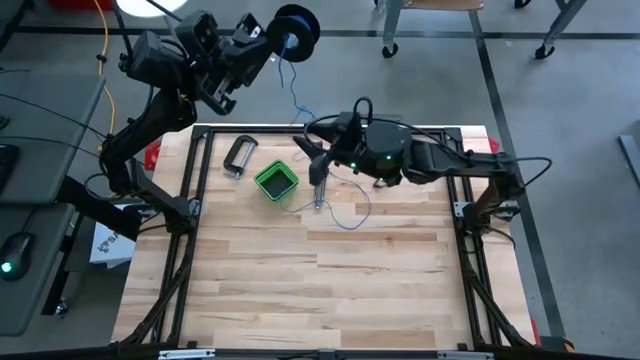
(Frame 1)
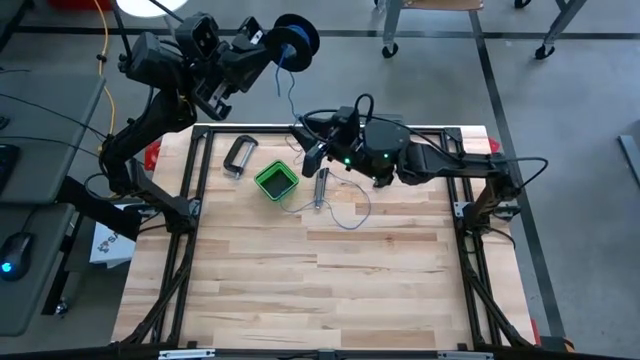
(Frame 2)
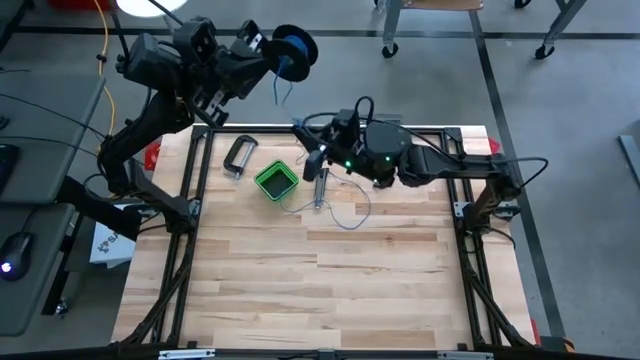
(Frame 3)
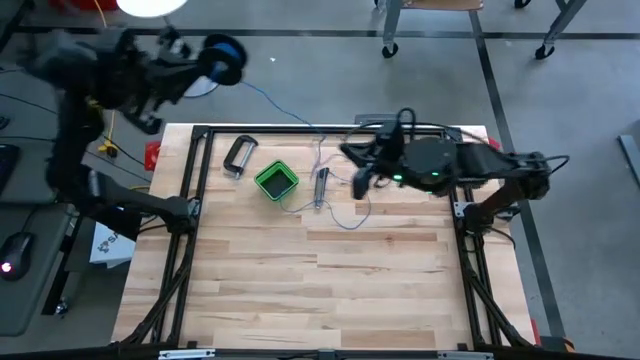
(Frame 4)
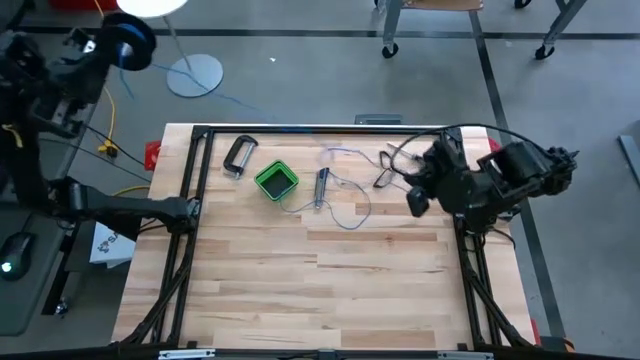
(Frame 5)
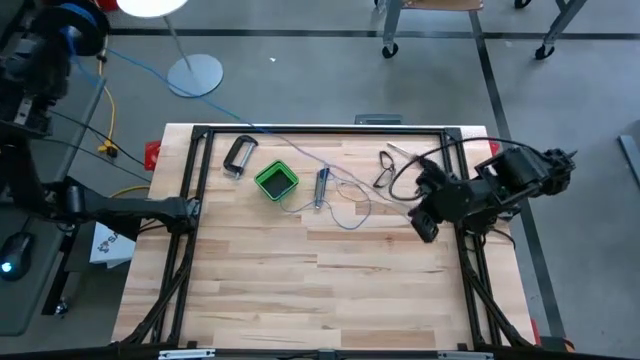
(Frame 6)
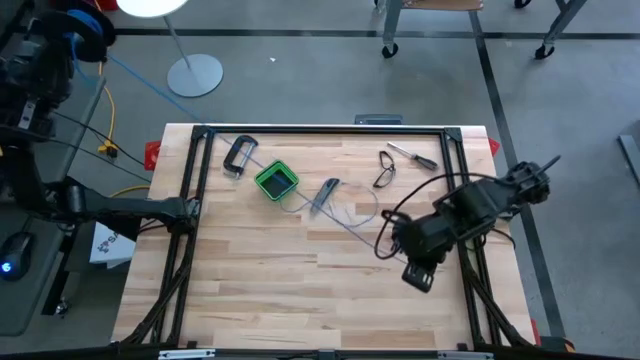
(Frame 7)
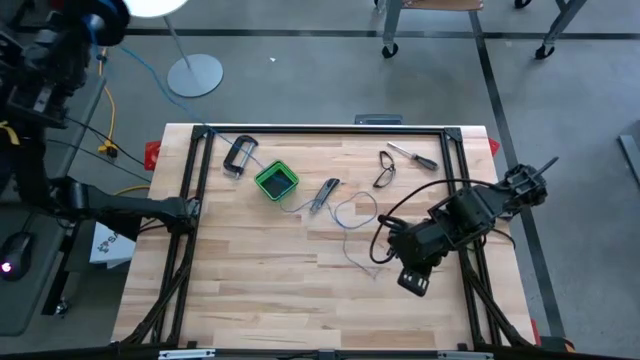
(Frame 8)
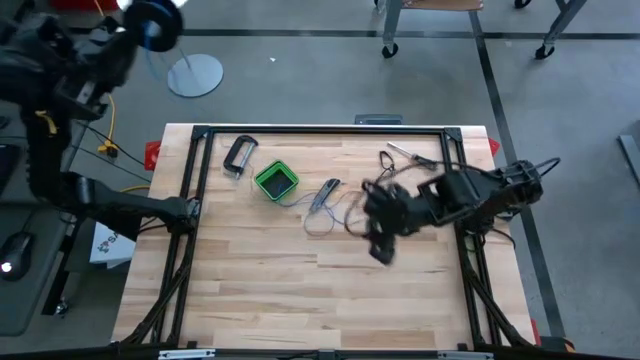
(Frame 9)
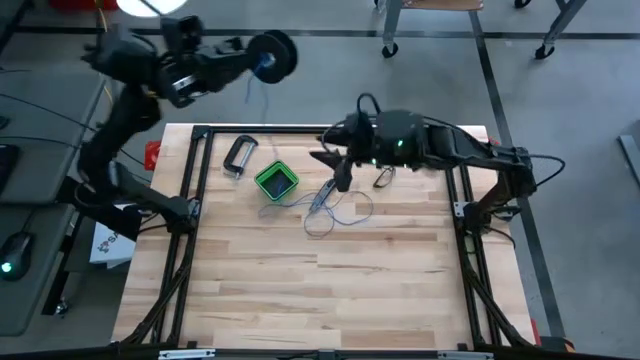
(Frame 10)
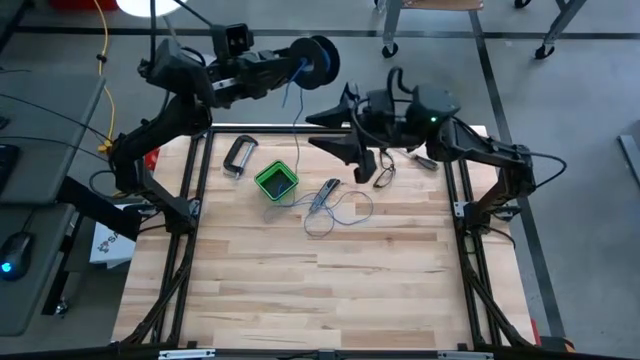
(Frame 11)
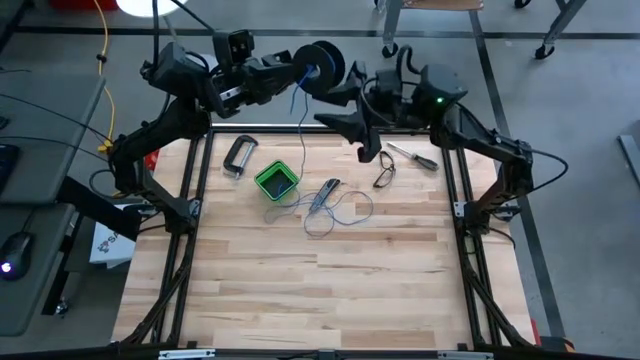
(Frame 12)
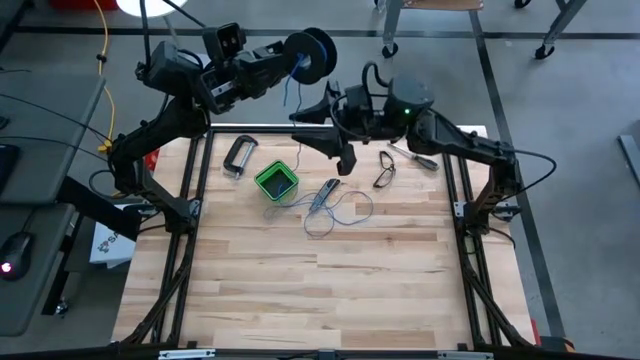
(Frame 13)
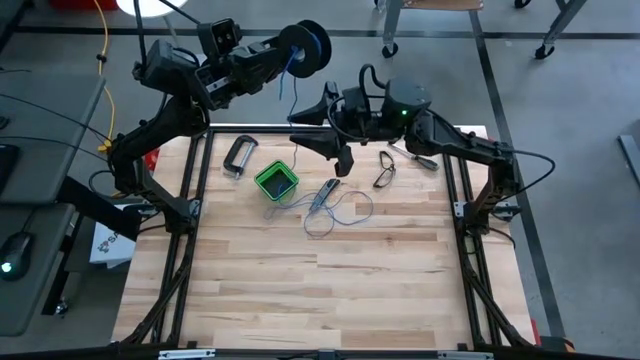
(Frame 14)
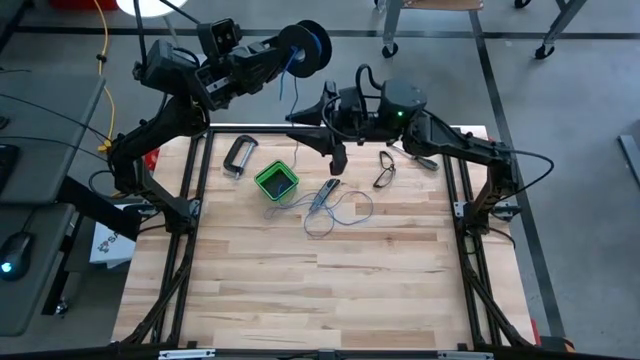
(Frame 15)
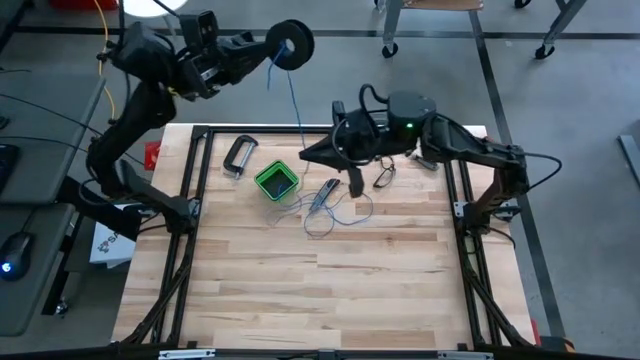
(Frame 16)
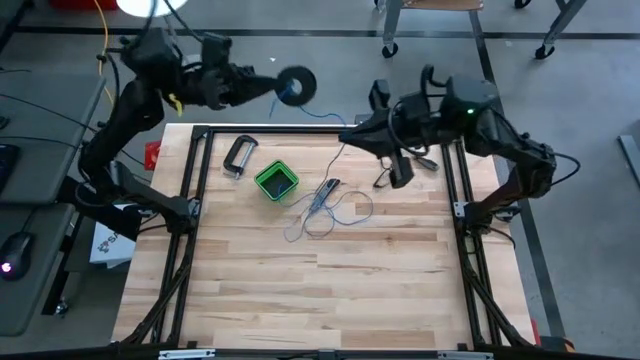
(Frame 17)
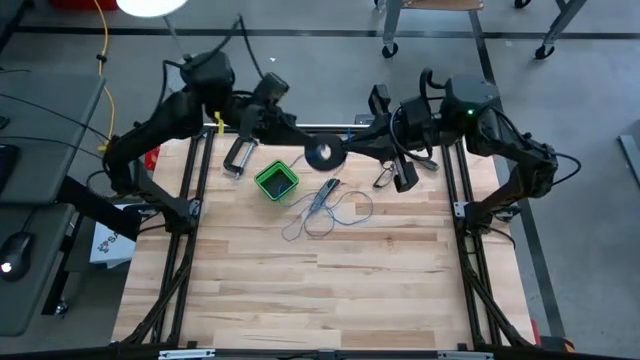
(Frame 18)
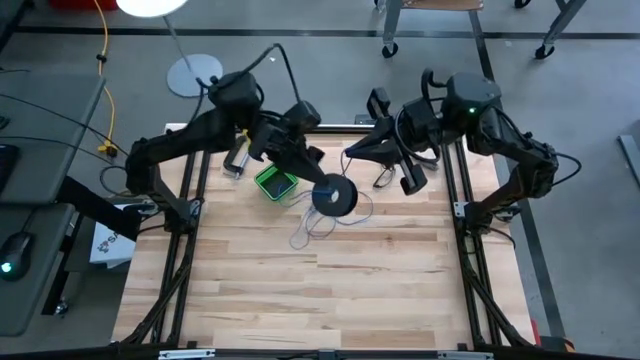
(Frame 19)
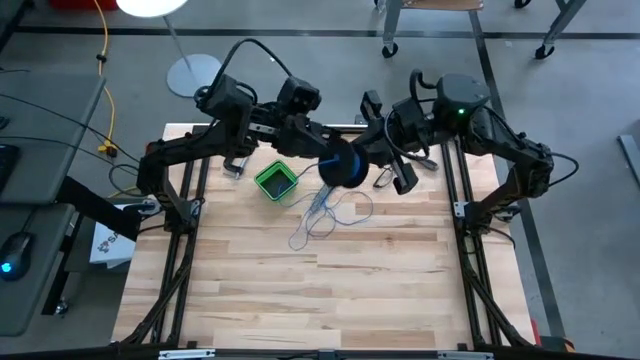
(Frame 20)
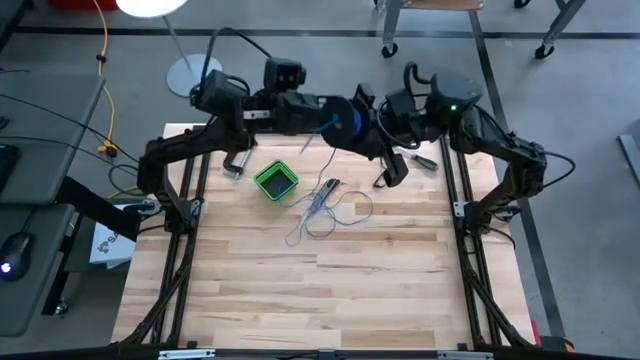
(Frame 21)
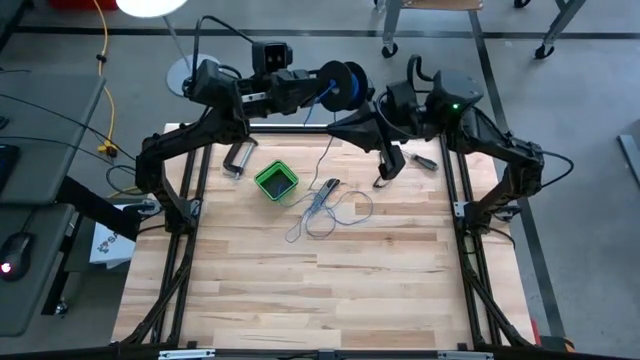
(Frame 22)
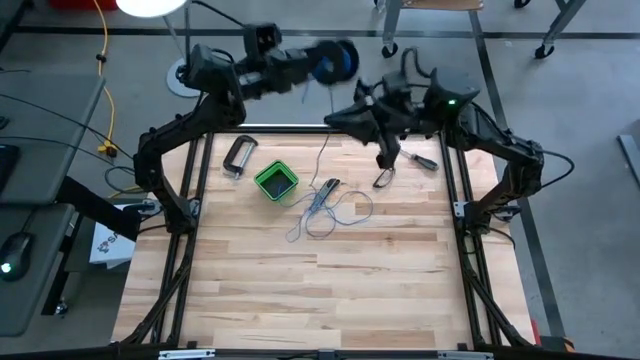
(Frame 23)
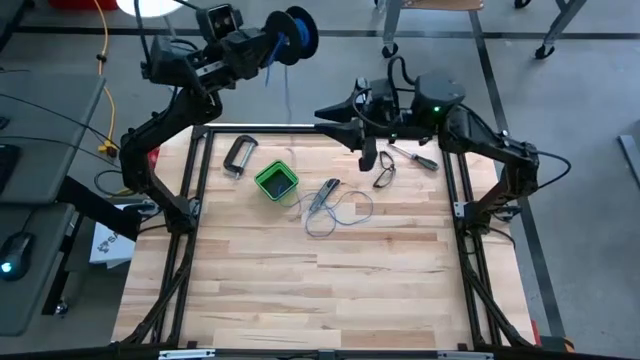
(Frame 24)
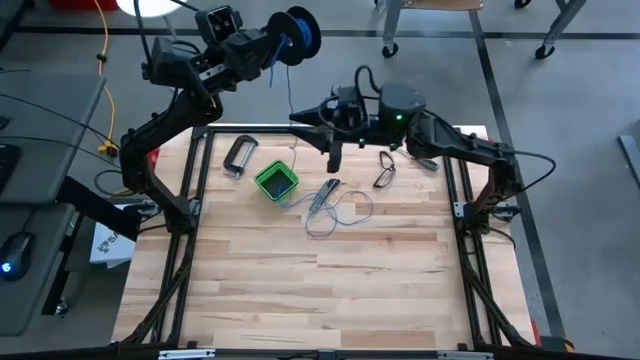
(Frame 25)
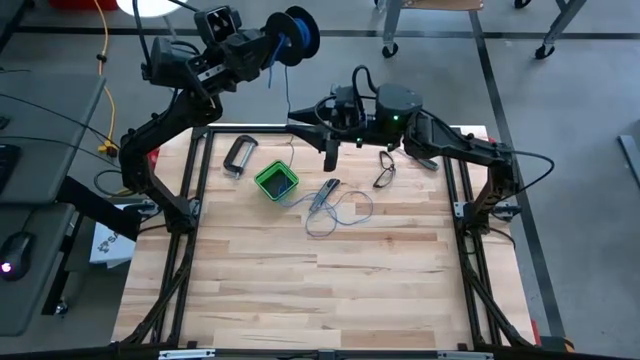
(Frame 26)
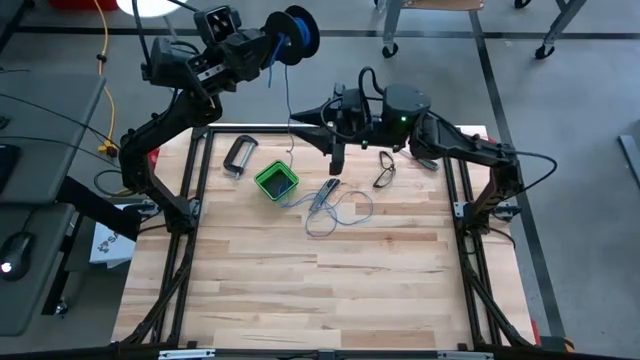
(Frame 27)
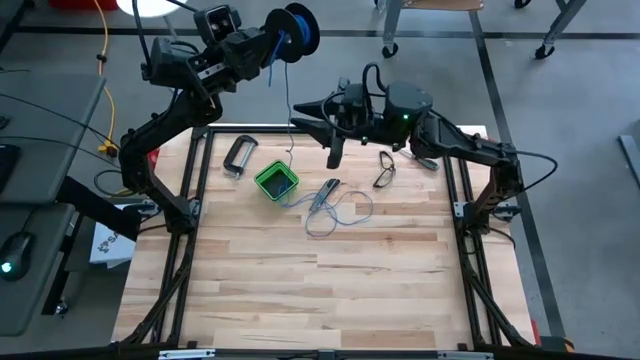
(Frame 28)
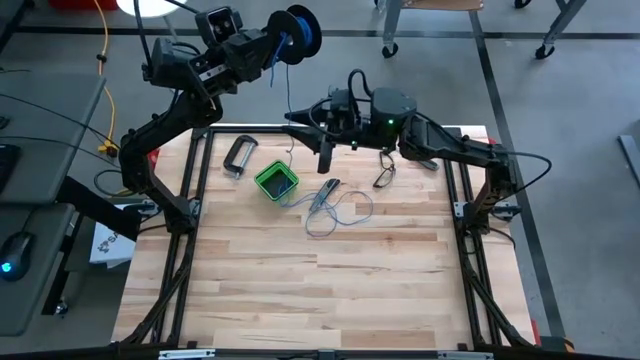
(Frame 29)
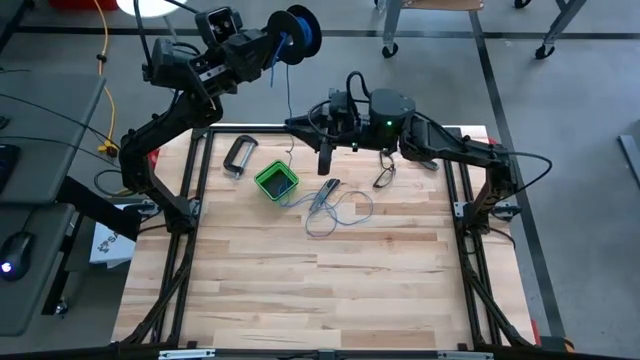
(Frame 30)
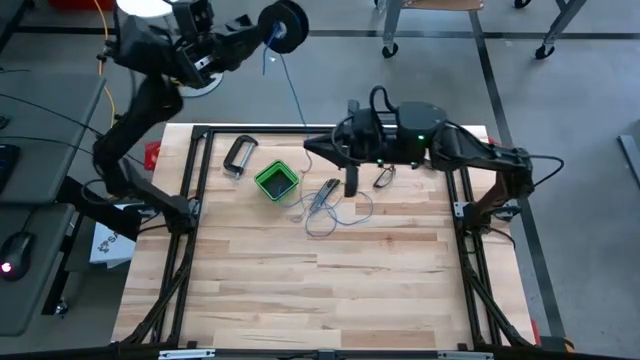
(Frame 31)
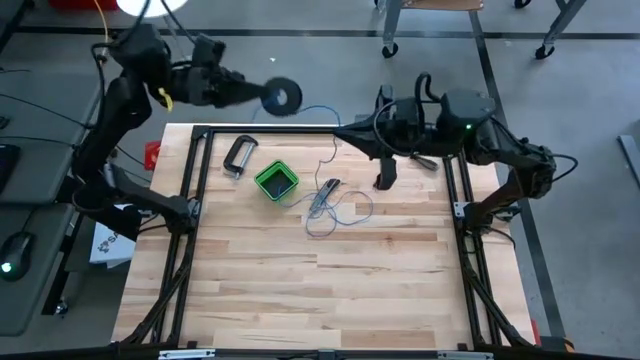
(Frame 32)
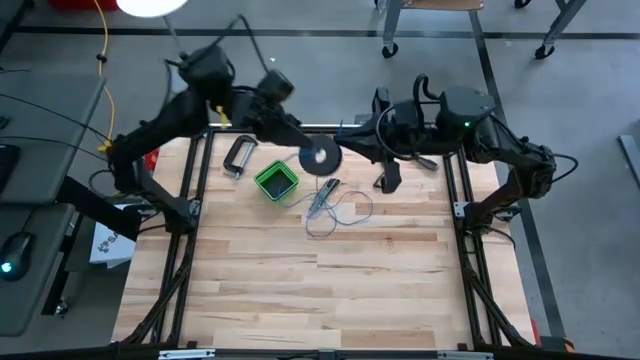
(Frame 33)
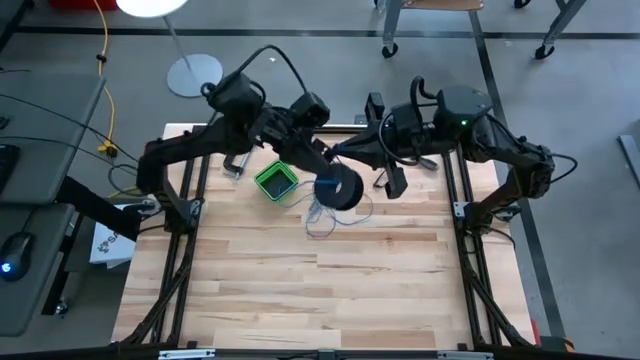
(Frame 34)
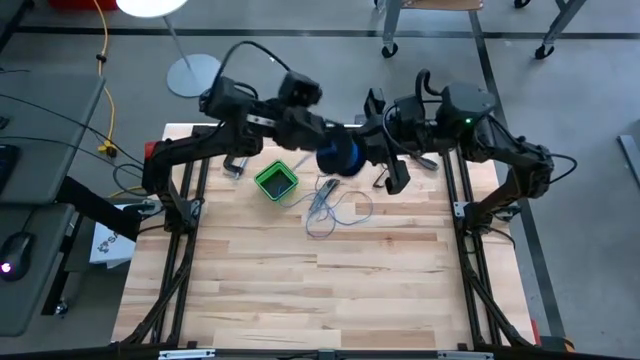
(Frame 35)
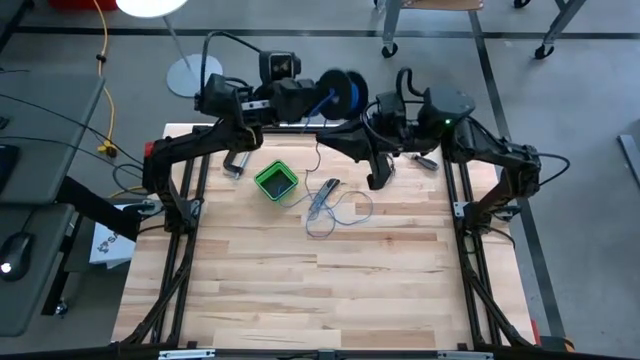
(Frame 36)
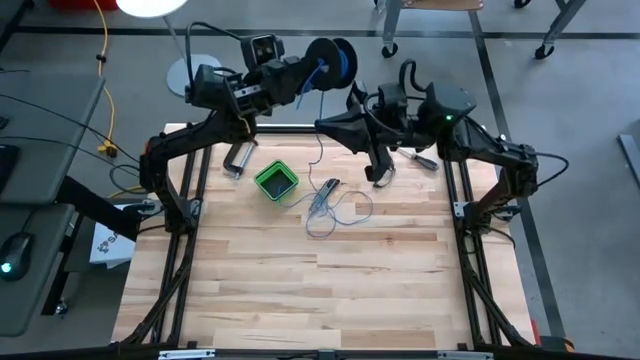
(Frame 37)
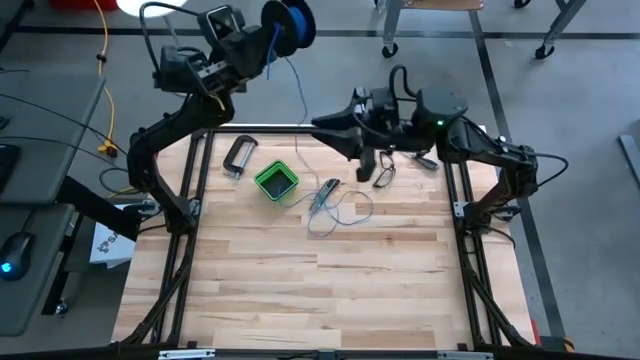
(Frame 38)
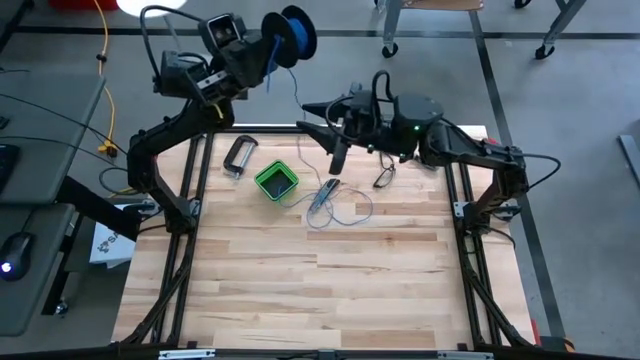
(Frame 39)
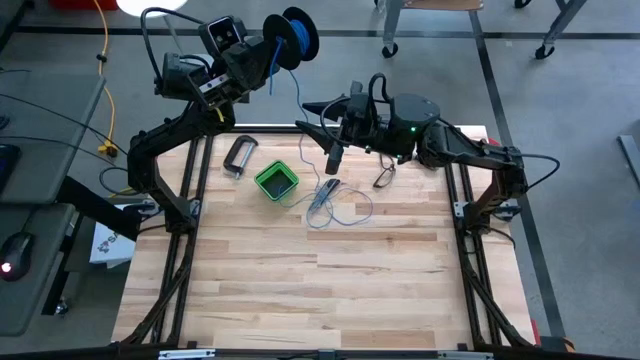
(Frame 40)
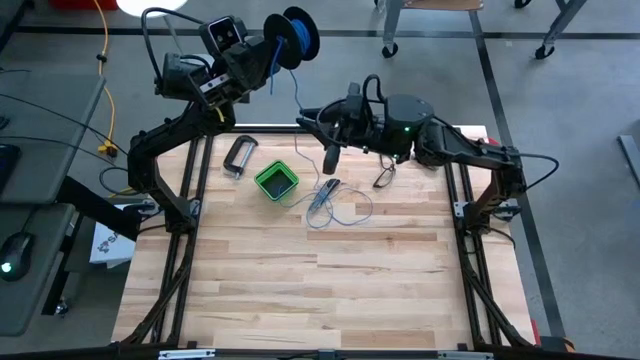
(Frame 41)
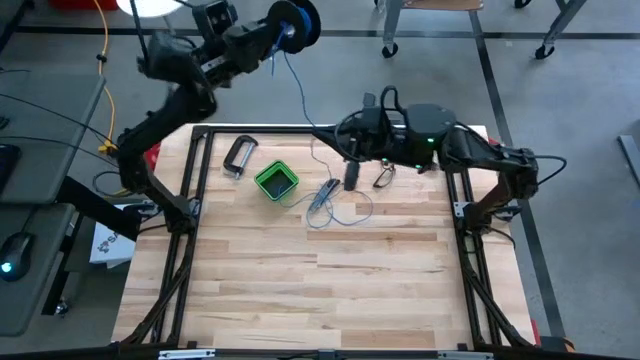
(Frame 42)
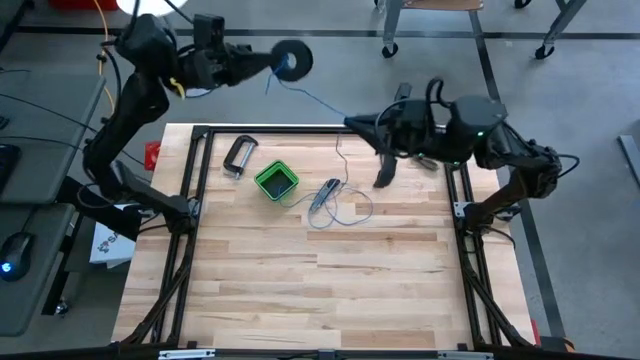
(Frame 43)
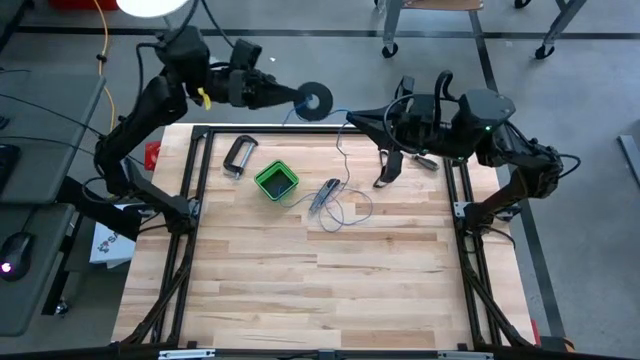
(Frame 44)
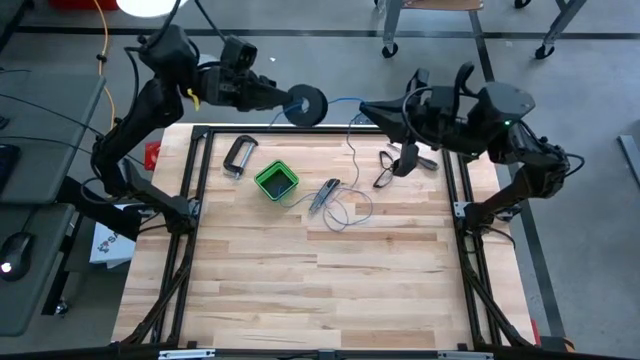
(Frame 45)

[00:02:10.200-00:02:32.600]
Task: Coil cords
Coil the blue wire onto the spool
